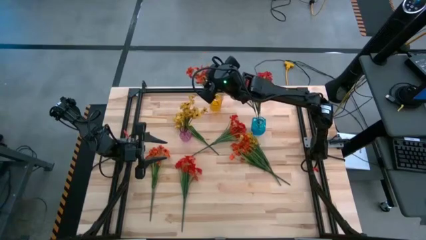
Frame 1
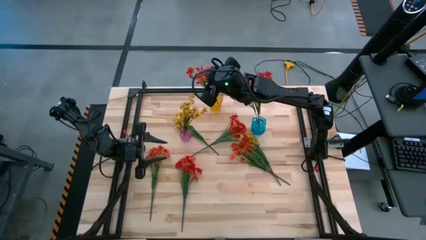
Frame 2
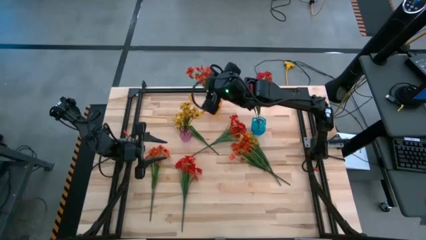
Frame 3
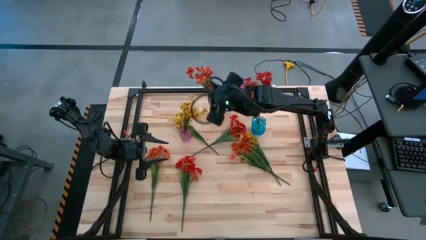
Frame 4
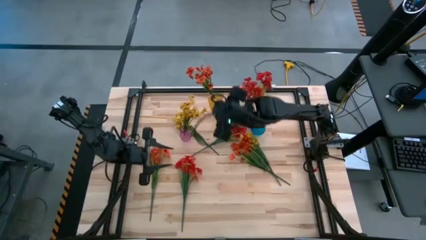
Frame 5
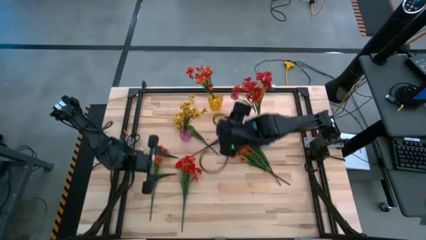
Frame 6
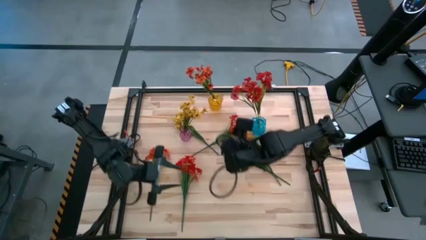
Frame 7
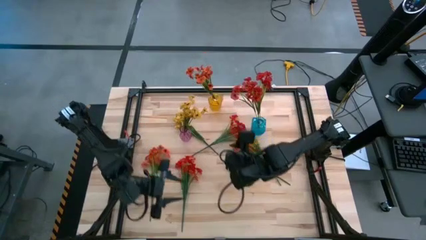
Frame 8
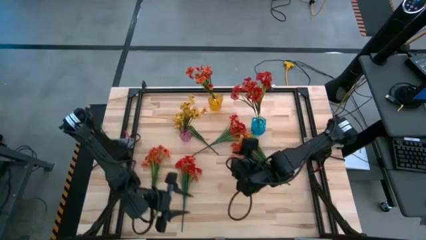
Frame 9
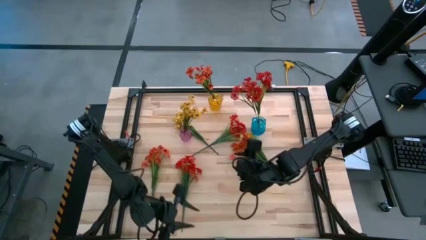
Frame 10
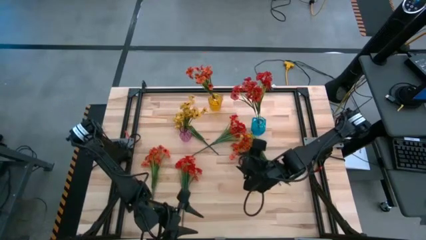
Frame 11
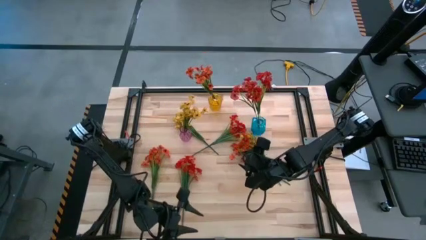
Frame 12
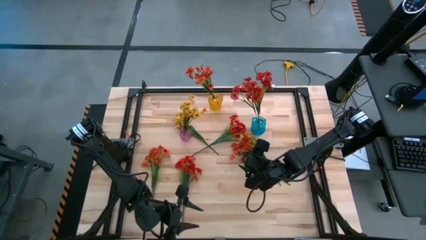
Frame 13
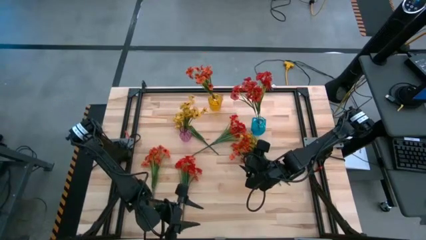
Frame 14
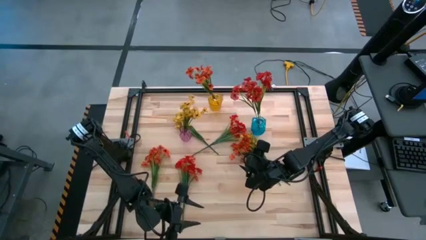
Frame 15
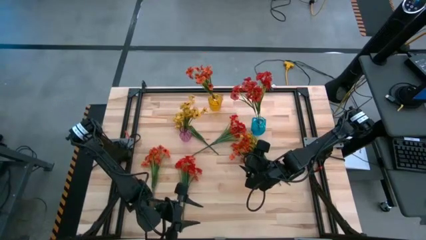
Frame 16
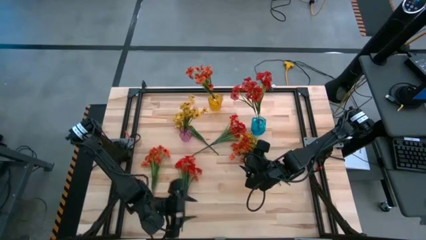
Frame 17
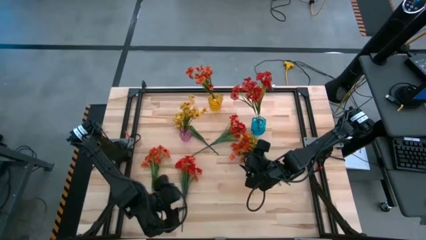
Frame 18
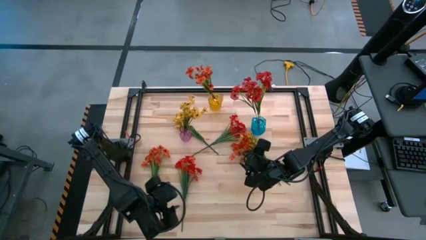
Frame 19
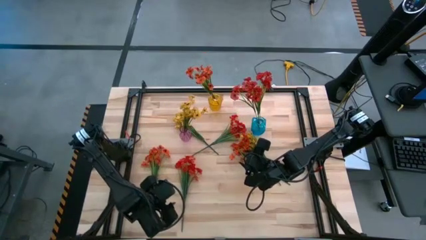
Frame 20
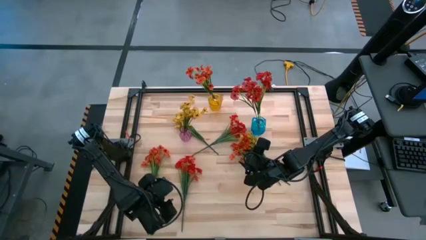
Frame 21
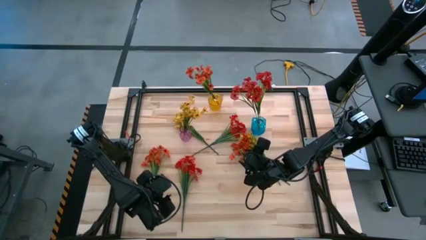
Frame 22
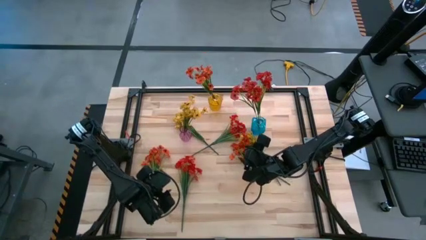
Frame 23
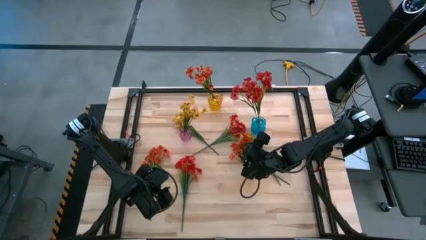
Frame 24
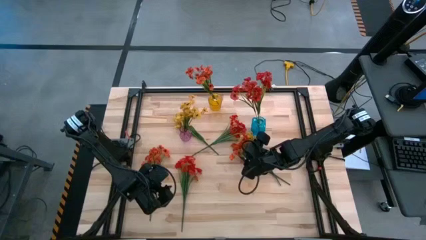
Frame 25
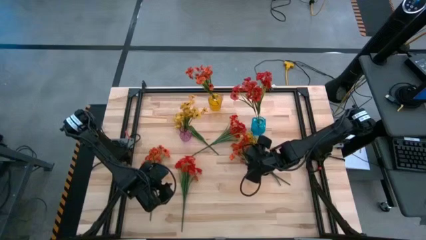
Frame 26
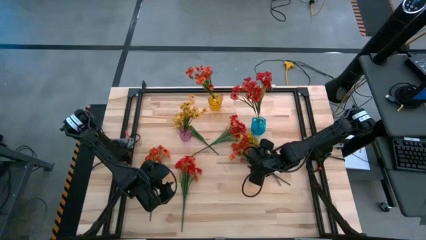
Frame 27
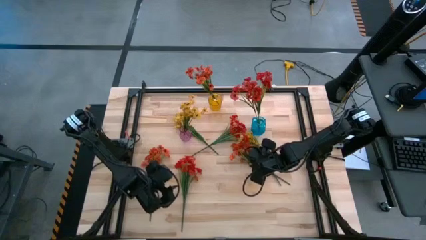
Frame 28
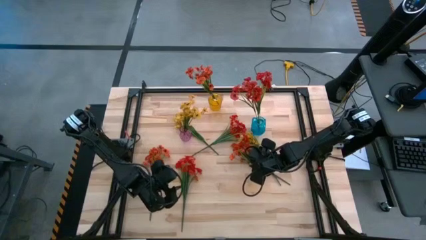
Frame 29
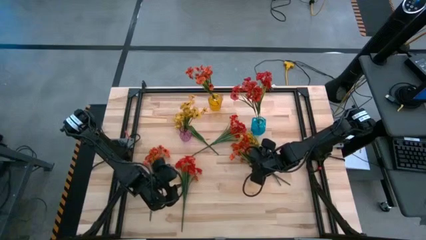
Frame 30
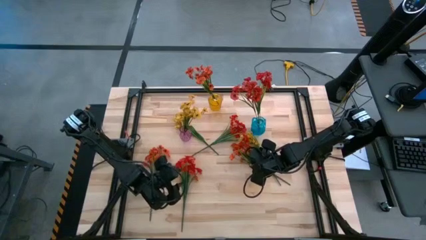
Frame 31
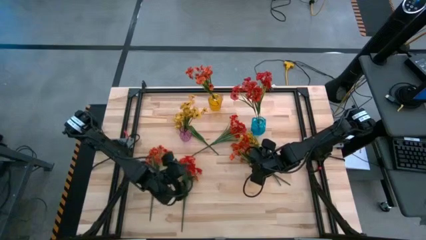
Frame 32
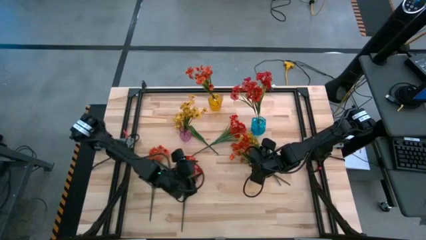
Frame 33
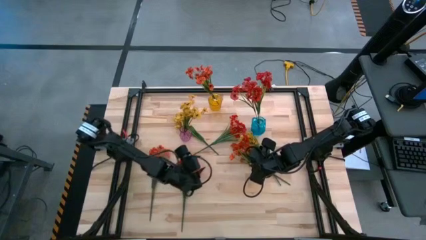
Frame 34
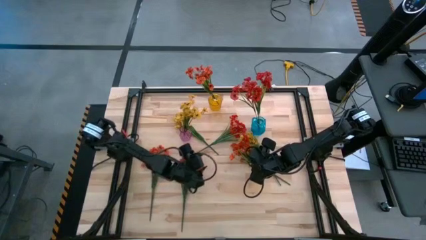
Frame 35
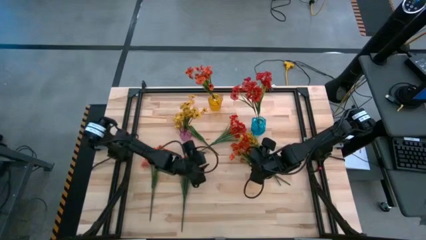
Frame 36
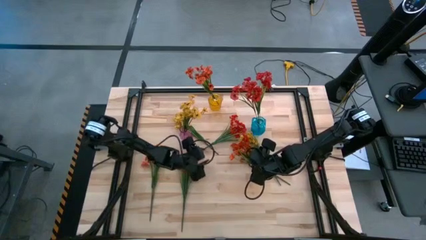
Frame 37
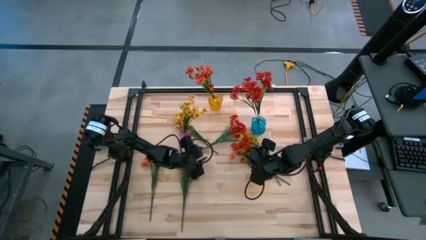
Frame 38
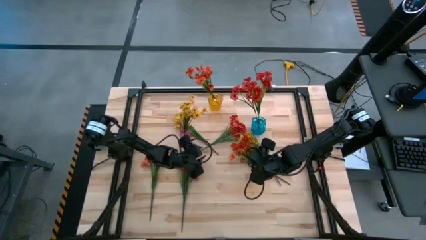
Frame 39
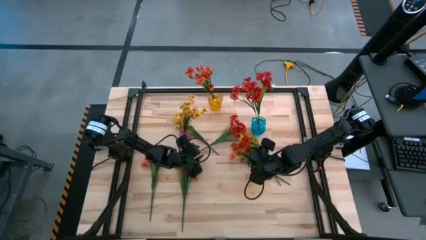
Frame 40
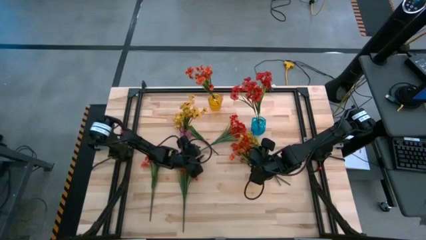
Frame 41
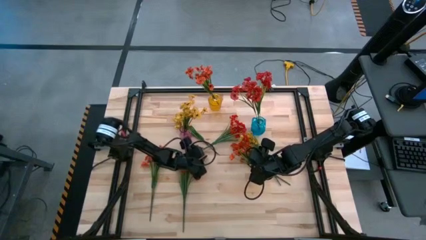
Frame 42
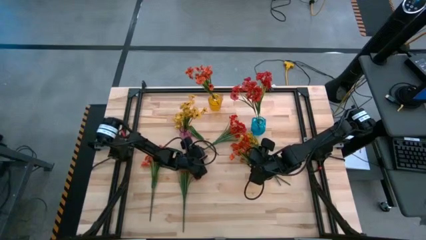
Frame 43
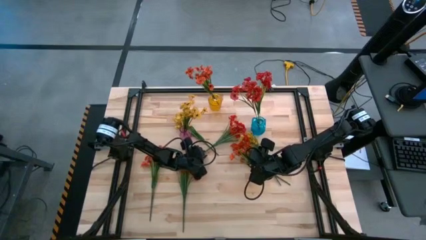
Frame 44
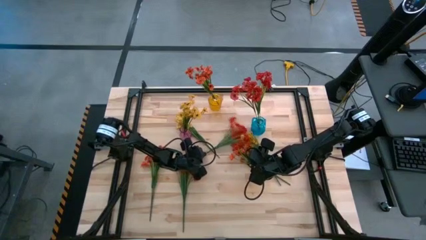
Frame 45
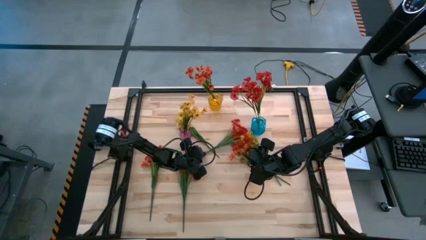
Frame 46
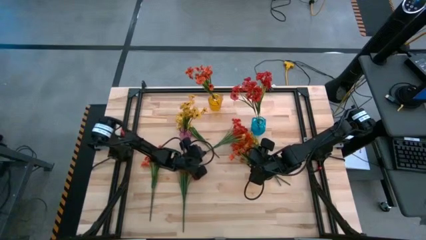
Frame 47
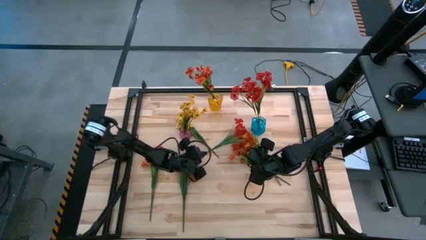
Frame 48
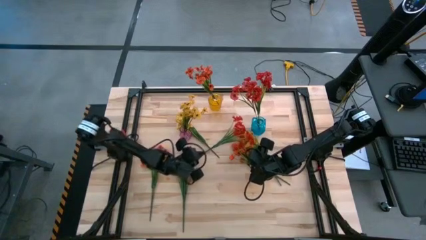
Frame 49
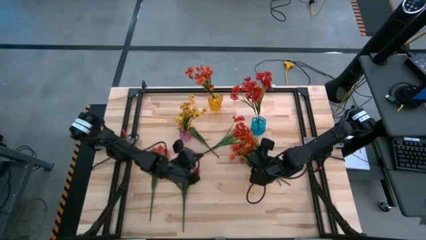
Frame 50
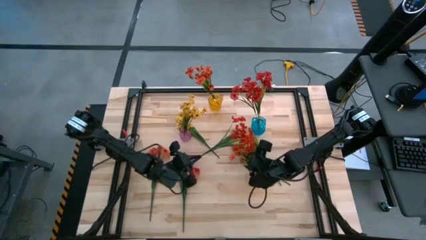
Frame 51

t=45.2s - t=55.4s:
Task: Sort flowers into vase by color
Put the top red flower into the blue vase

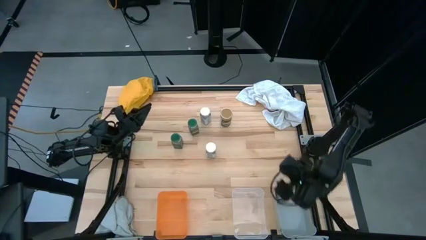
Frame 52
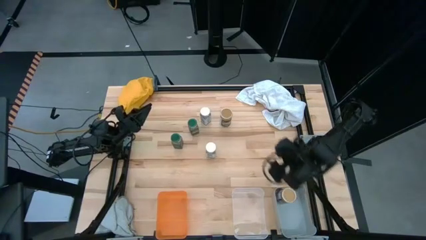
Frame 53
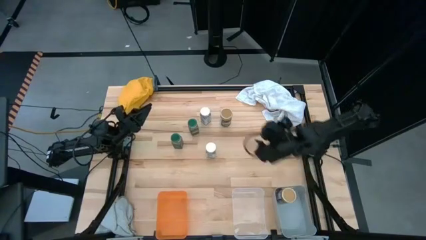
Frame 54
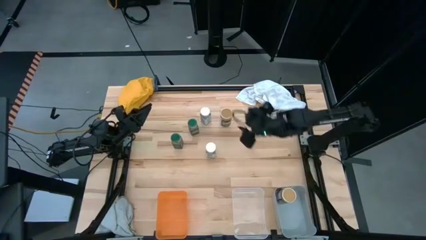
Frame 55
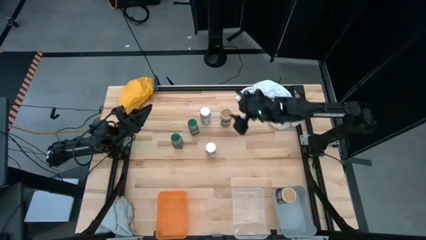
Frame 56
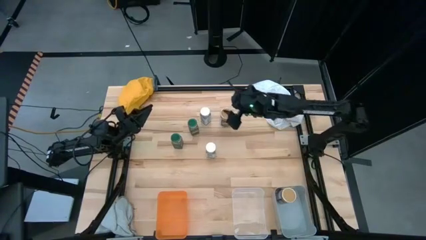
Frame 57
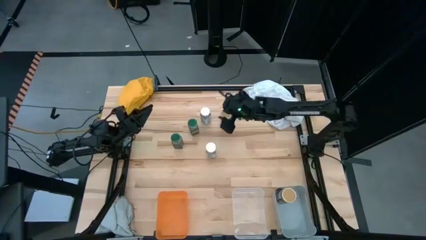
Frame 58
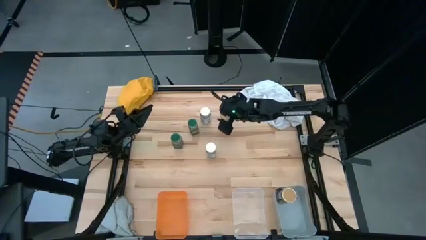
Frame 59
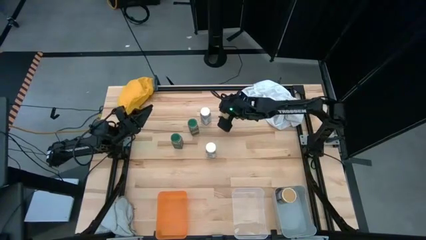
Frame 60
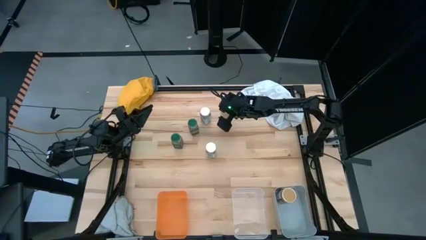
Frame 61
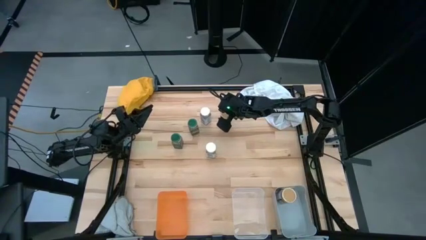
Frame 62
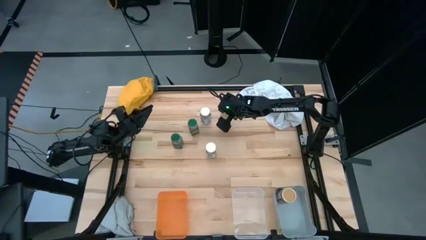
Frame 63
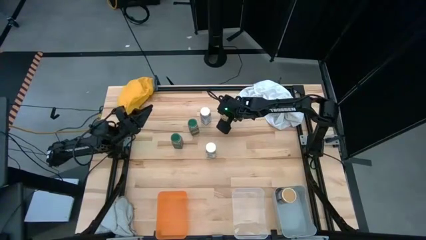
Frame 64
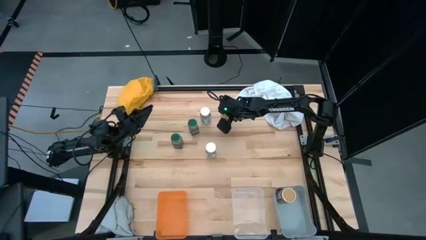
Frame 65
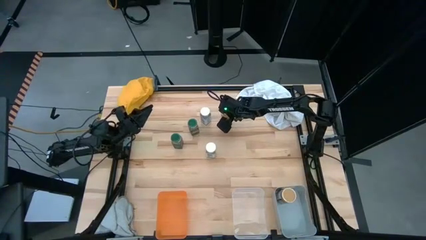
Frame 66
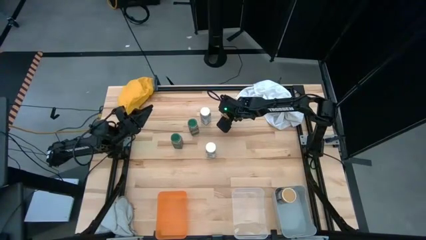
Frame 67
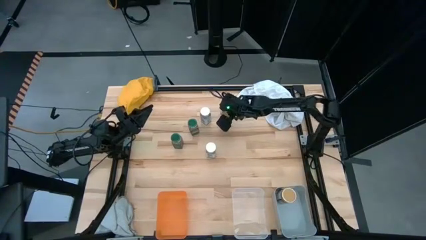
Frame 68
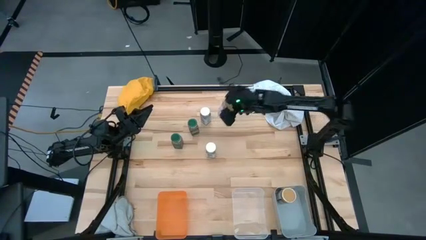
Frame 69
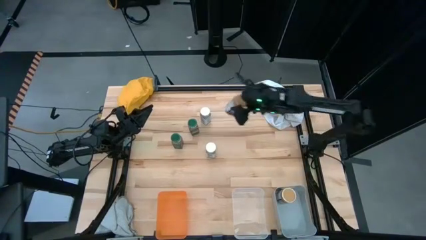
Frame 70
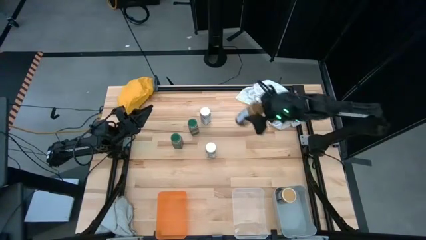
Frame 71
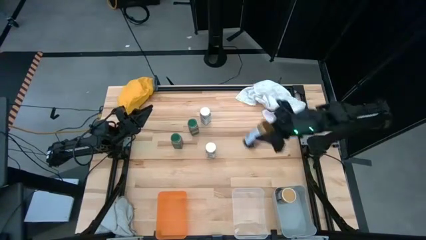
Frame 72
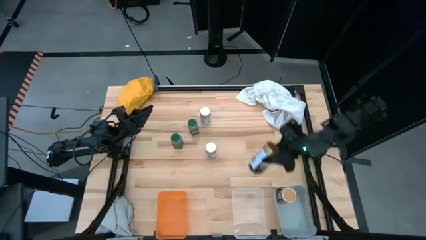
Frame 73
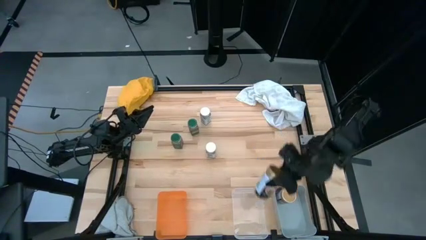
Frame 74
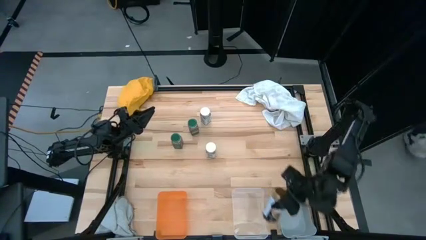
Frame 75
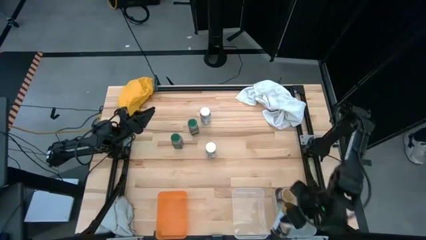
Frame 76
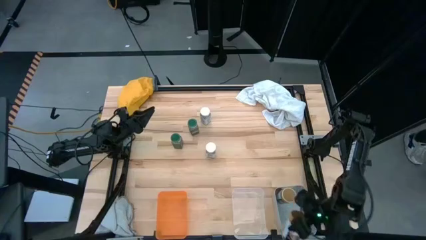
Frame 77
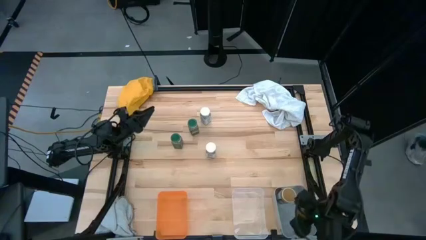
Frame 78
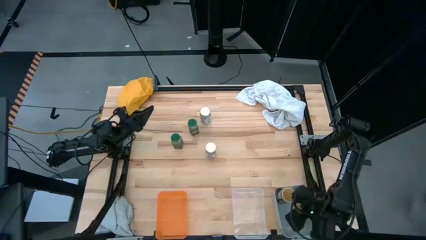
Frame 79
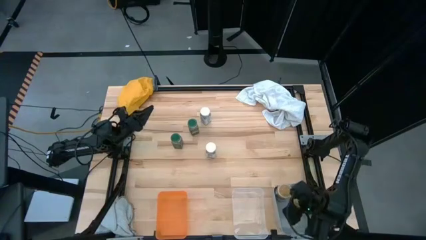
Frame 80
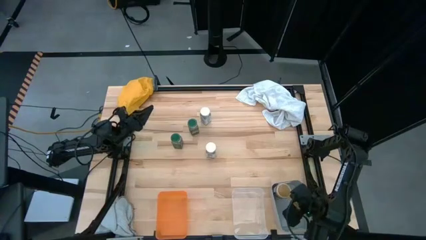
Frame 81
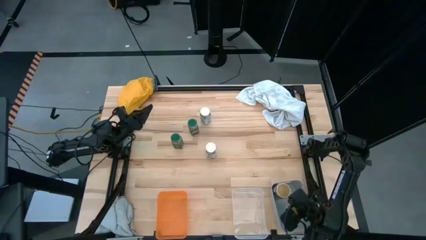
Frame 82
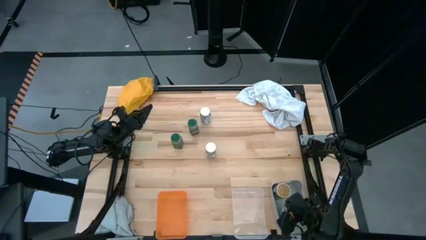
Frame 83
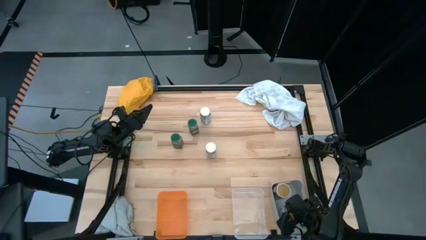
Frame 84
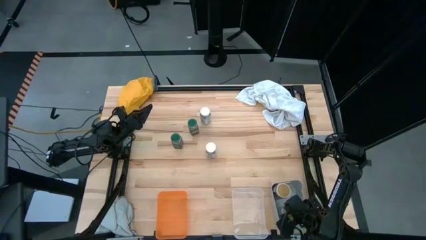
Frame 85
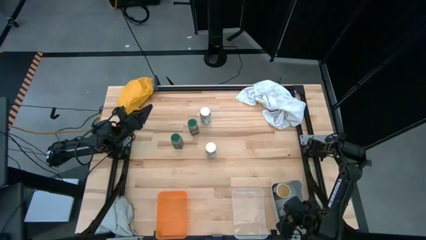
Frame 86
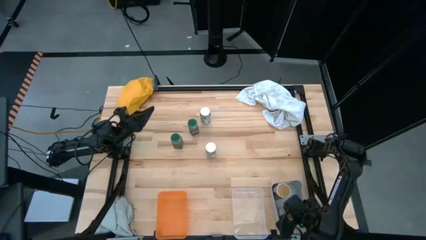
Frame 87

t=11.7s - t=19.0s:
Task: Sort spices by type
Put the brown spice bottle into the gray bin
